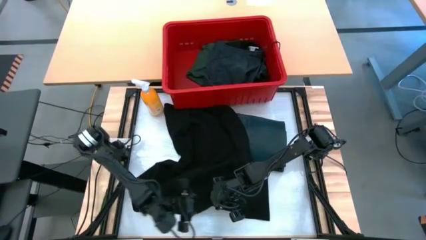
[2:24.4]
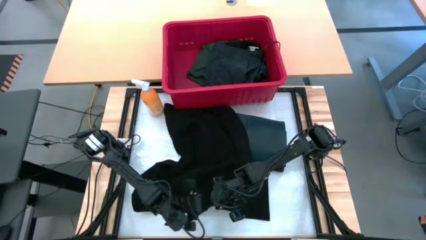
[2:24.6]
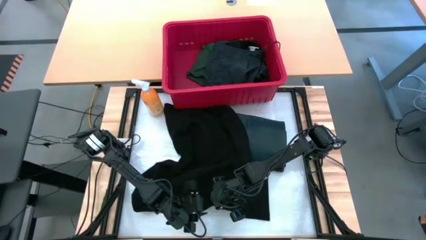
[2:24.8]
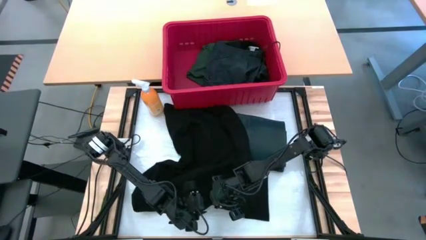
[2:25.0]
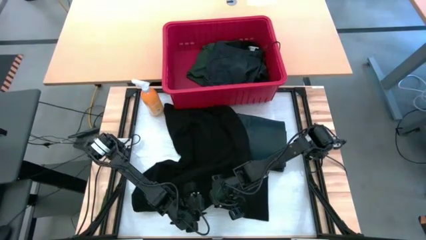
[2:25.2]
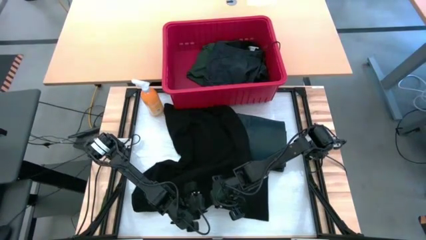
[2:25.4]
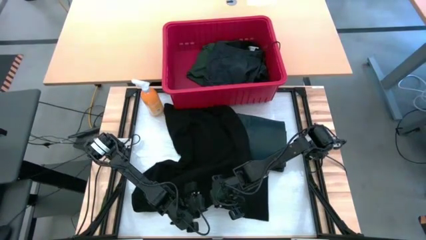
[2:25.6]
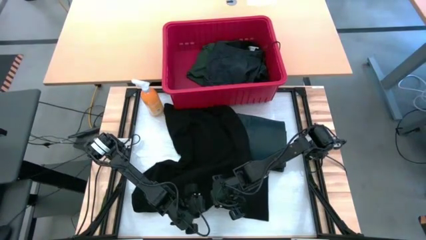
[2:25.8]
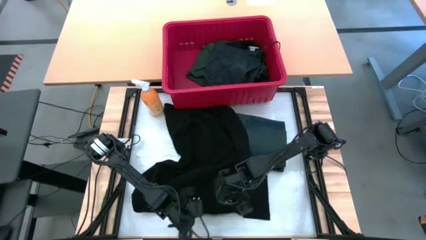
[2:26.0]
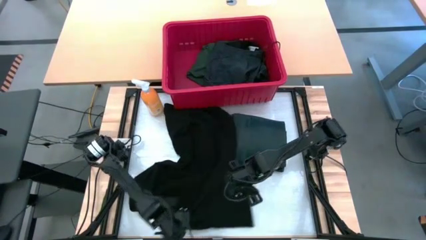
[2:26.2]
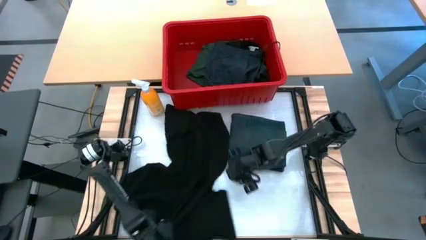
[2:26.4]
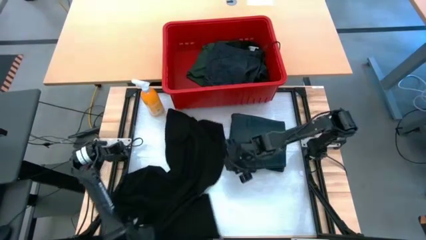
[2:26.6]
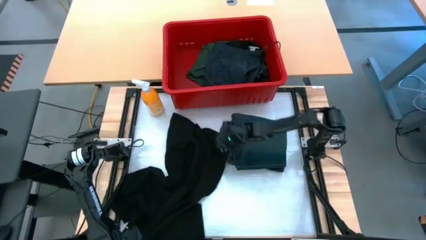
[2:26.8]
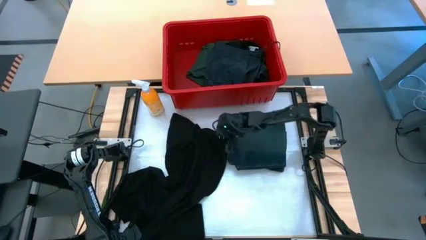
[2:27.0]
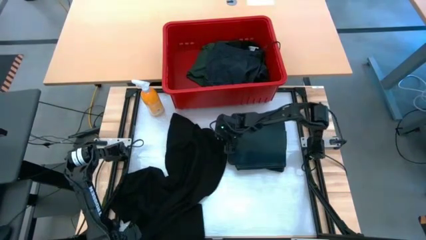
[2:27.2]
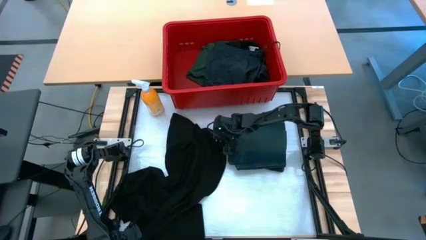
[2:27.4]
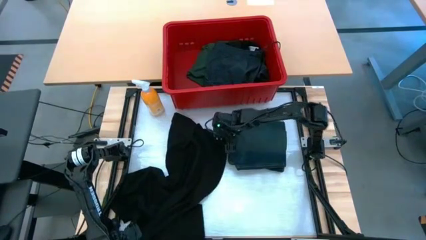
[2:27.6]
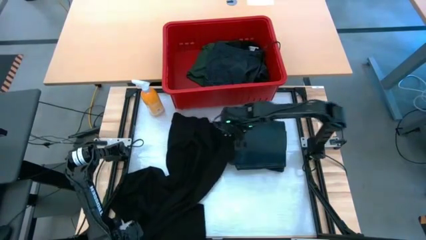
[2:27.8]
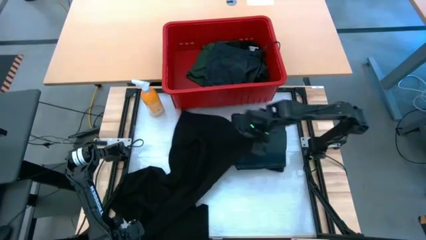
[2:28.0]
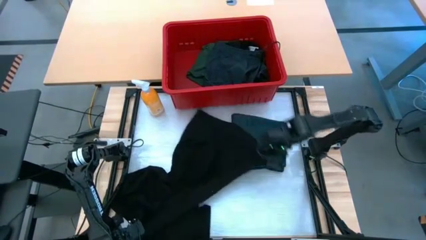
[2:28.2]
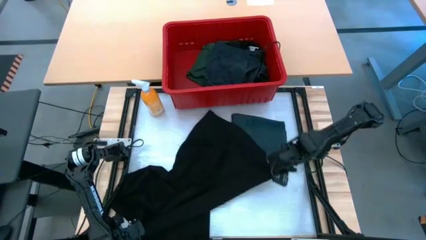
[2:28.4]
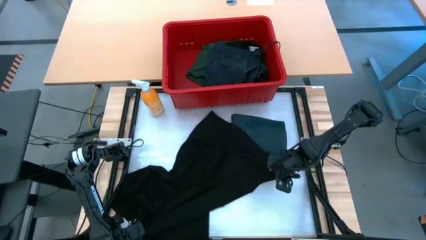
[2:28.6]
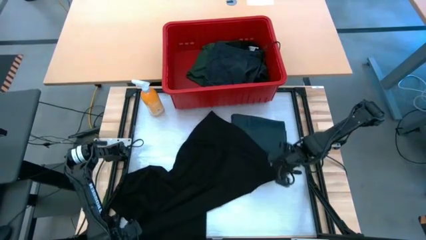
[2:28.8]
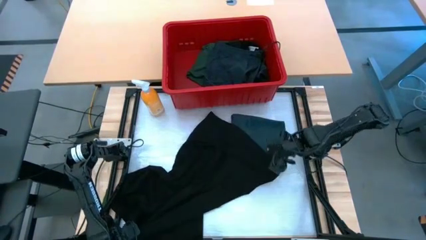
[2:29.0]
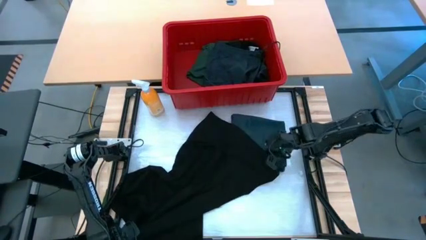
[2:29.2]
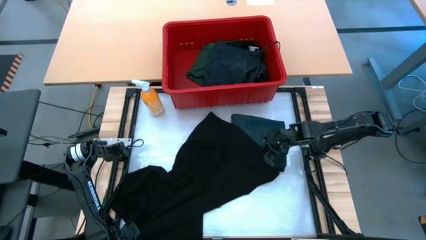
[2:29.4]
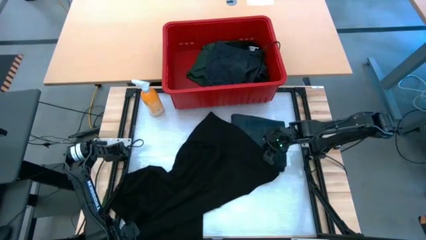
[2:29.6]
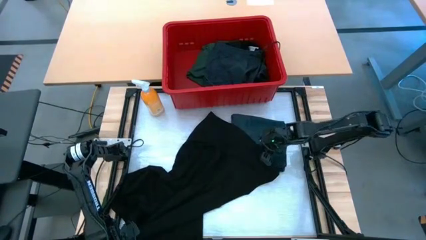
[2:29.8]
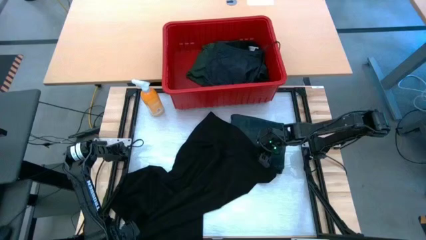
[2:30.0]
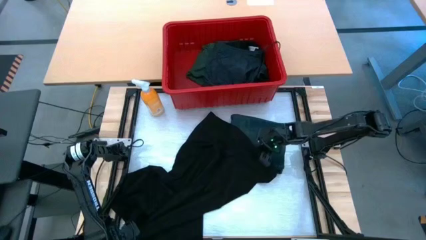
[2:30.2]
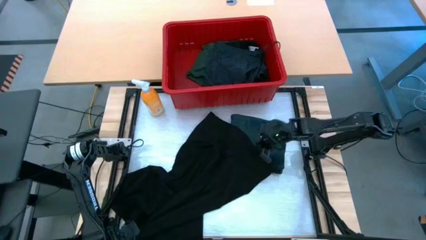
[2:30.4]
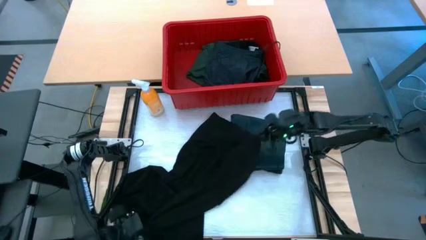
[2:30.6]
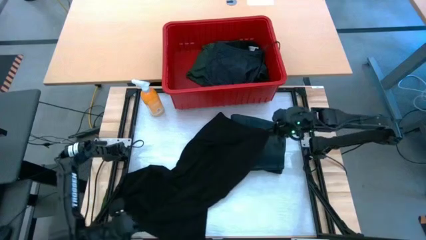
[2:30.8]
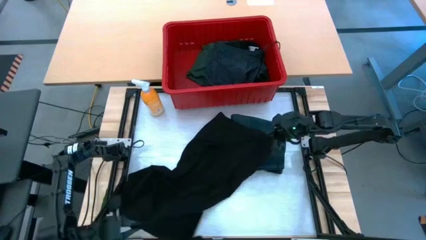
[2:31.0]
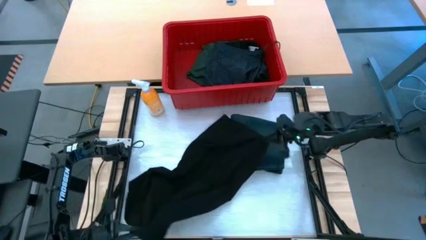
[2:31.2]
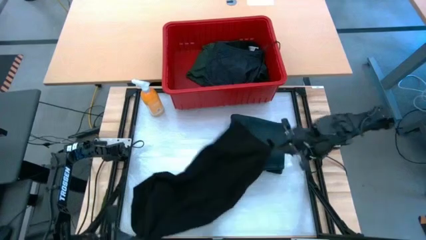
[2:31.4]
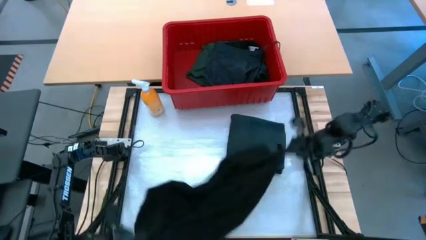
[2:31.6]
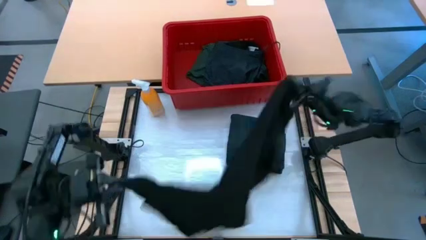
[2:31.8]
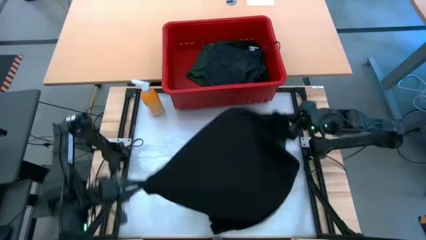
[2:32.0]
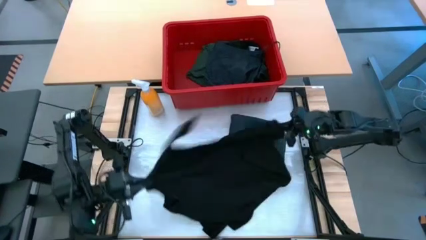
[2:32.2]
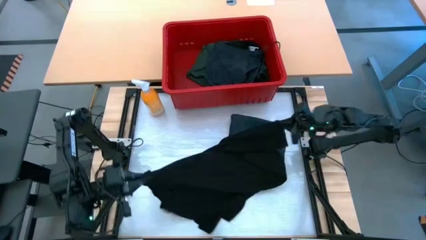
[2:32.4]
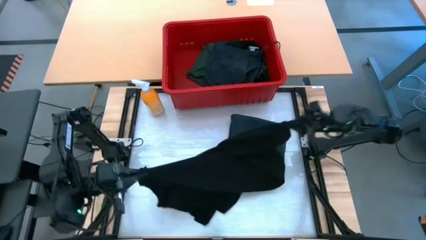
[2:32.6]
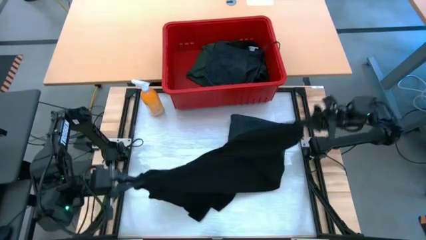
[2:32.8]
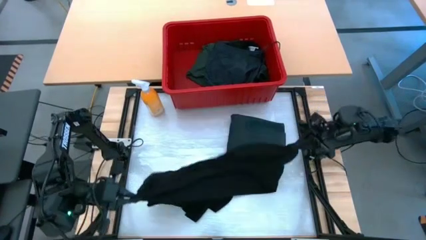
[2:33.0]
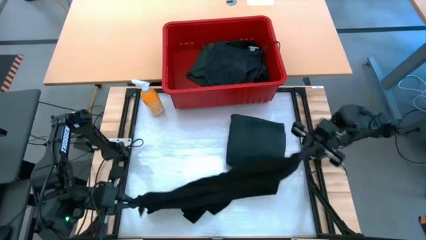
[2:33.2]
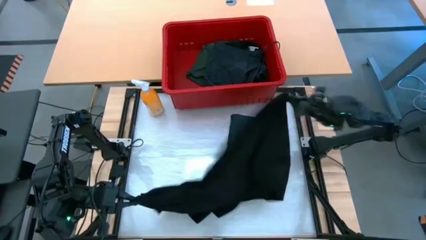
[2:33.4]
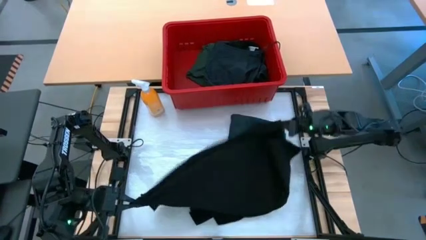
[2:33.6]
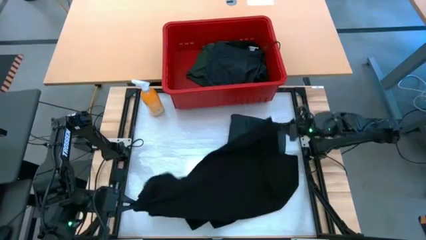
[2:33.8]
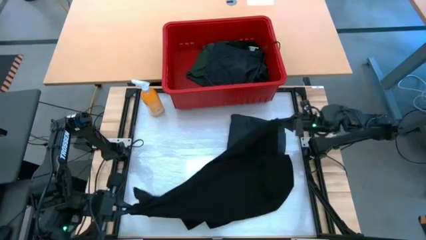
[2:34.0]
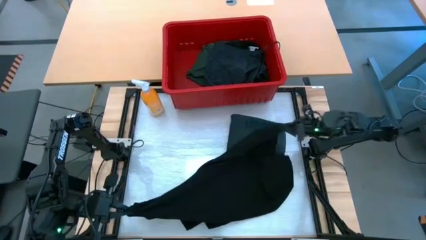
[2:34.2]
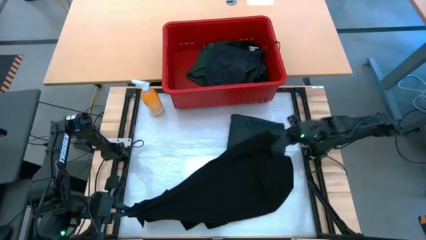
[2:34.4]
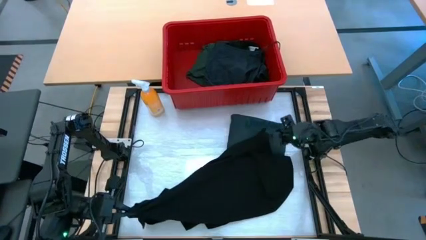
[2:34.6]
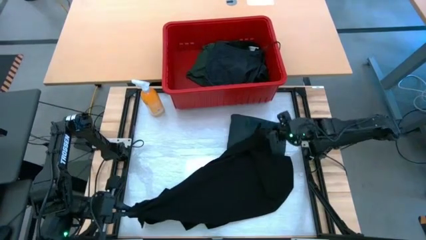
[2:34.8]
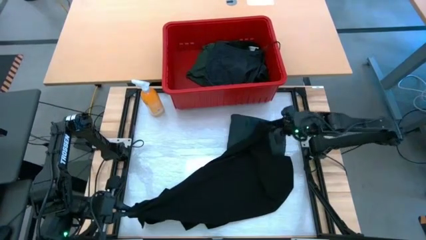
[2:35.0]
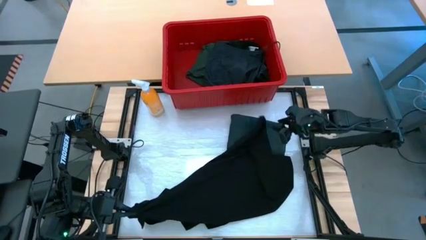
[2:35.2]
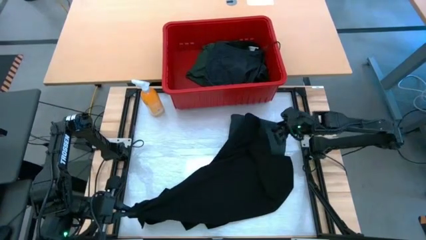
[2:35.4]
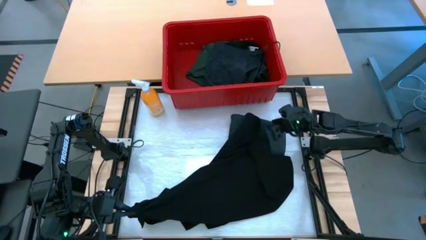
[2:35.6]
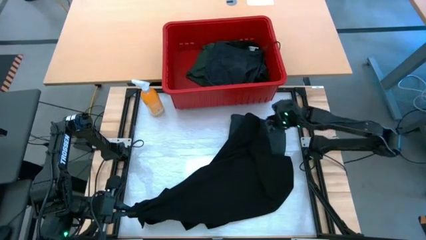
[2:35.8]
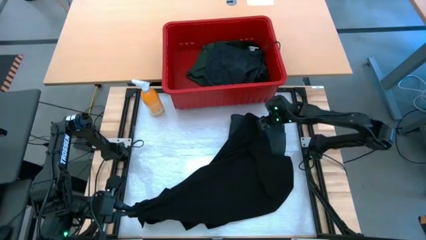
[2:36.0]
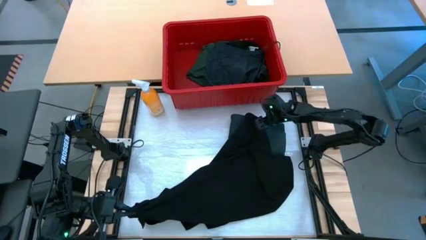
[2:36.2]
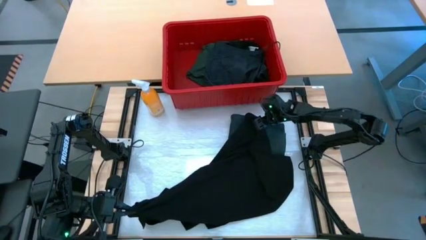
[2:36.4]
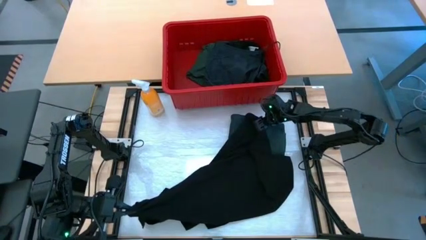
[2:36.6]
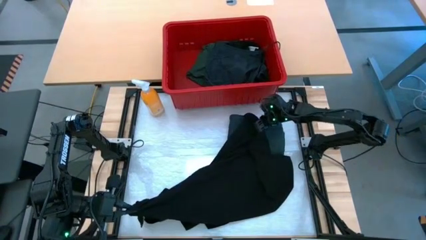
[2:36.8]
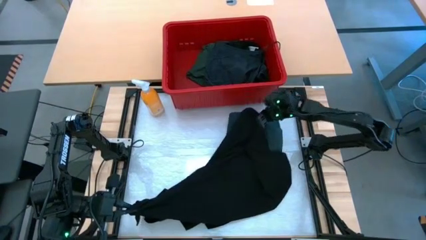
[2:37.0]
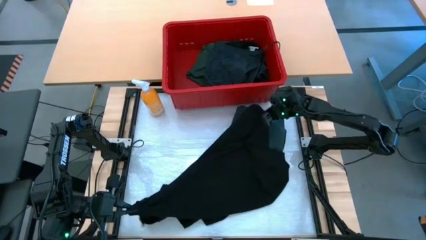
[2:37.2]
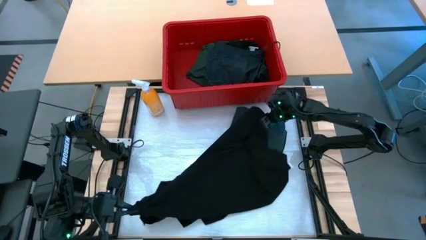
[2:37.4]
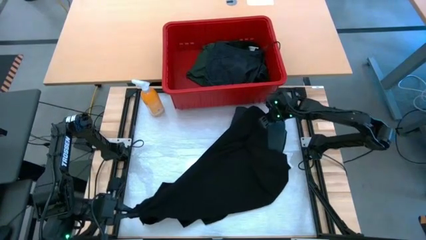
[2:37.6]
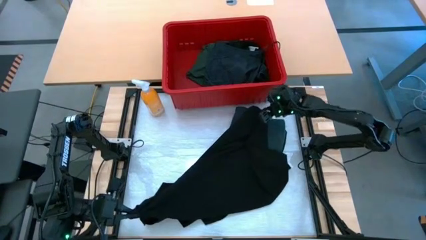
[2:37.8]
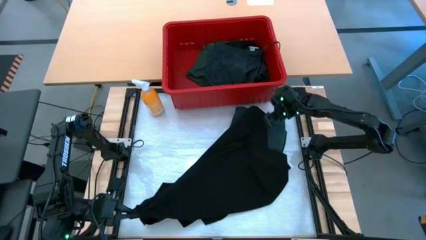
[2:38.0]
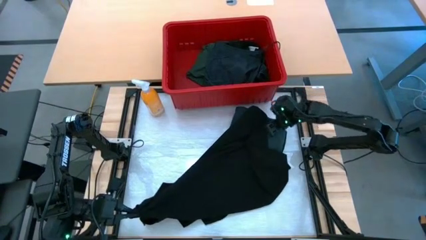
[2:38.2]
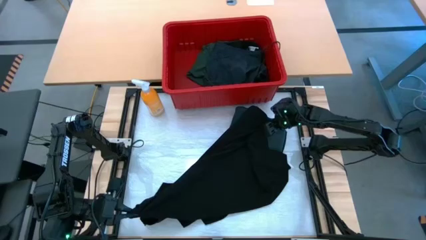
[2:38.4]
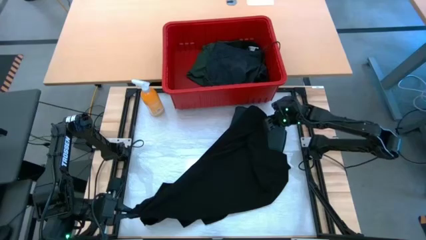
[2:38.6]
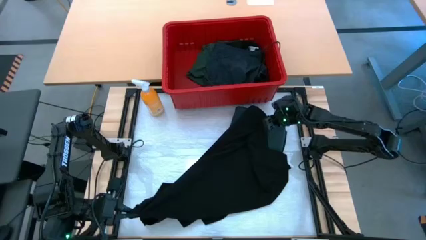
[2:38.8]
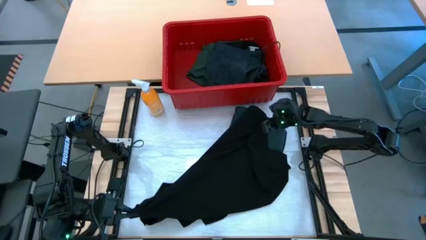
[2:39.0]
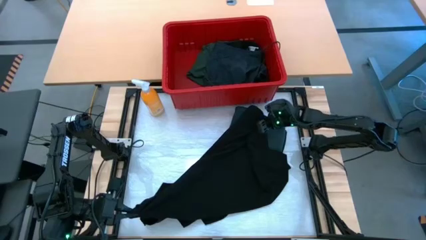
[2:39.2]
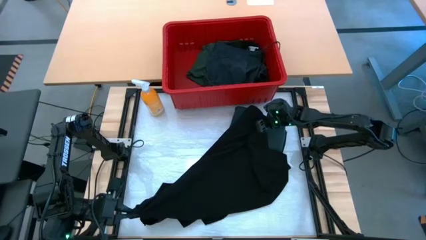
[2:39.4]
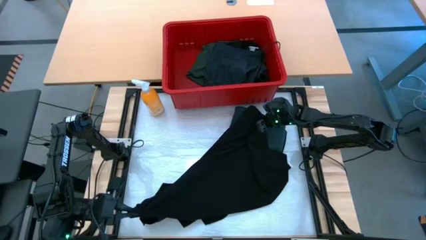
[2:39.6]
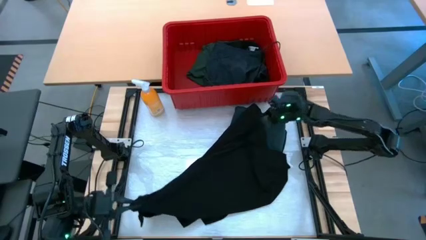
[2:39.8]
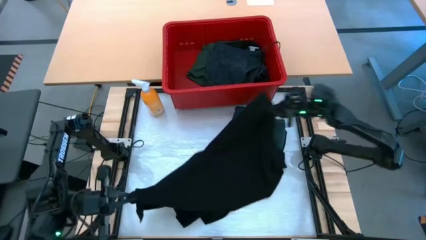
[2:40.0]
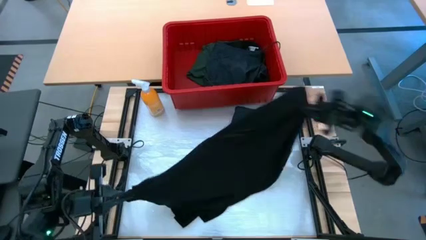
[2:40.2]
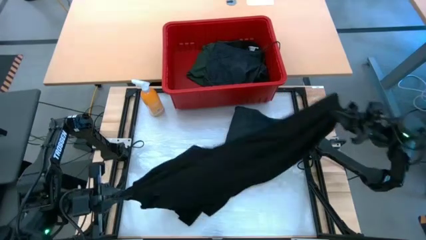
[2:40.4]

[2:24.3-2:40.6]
Task: Fold Laundry from Bin
Fold the black shirt
